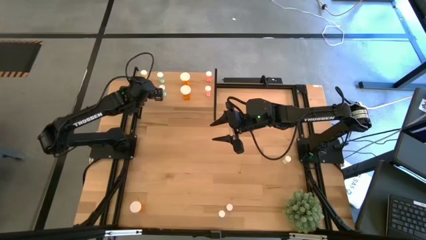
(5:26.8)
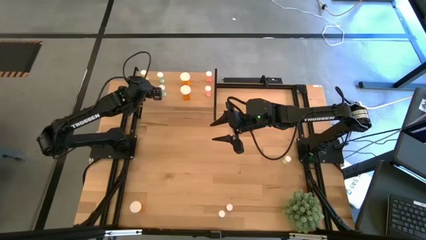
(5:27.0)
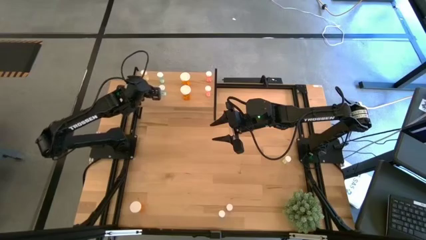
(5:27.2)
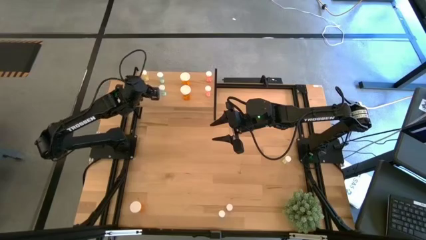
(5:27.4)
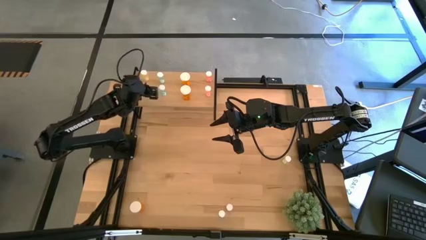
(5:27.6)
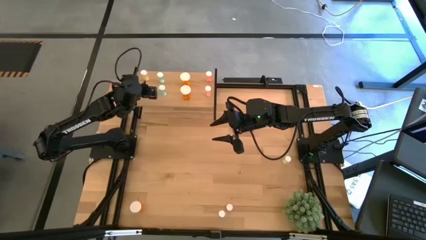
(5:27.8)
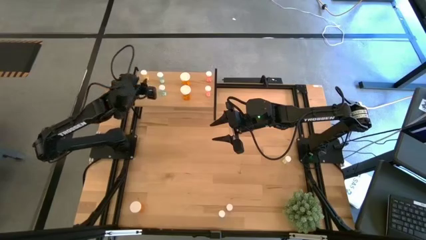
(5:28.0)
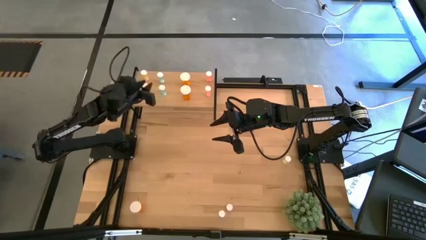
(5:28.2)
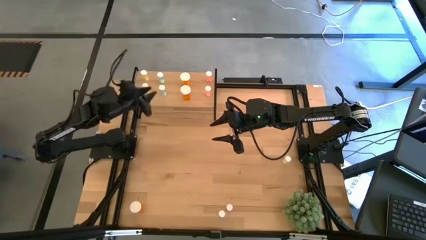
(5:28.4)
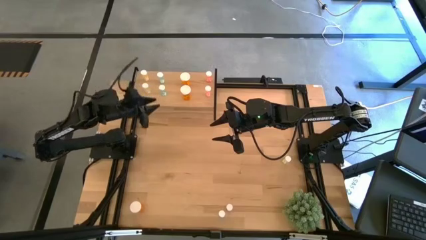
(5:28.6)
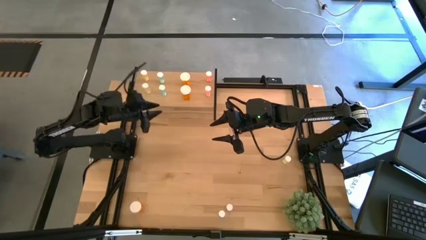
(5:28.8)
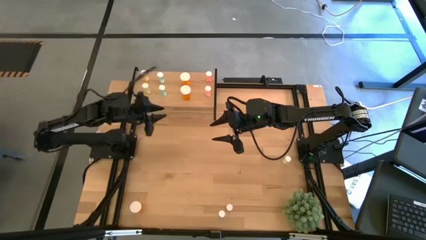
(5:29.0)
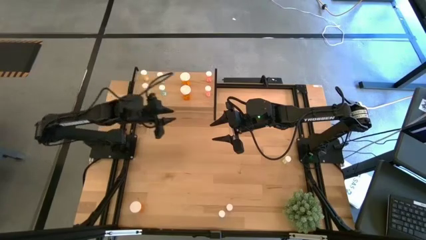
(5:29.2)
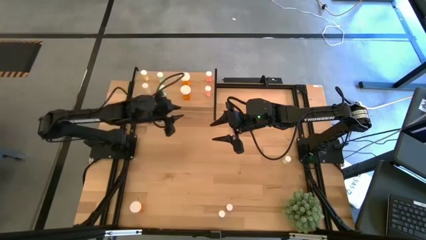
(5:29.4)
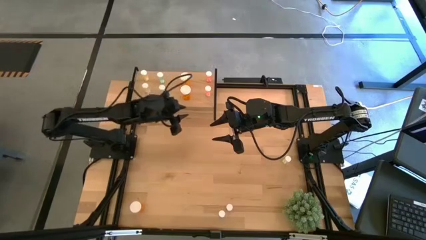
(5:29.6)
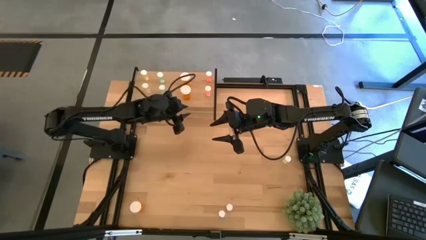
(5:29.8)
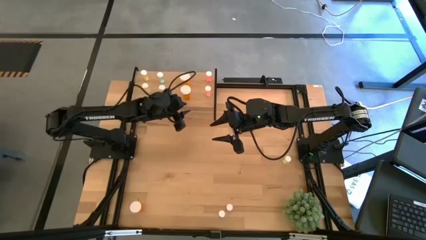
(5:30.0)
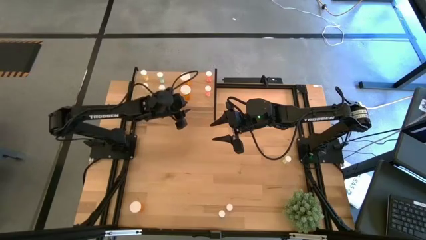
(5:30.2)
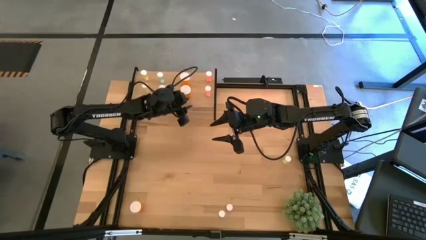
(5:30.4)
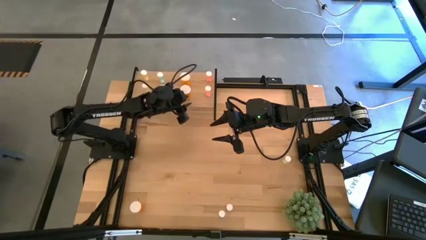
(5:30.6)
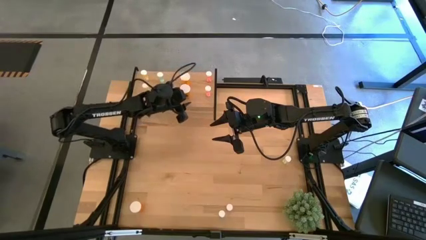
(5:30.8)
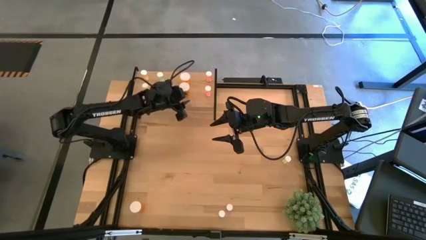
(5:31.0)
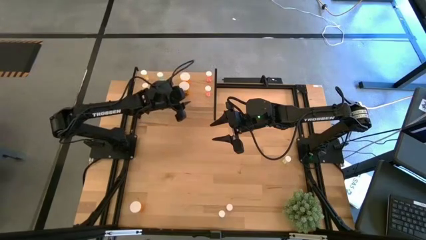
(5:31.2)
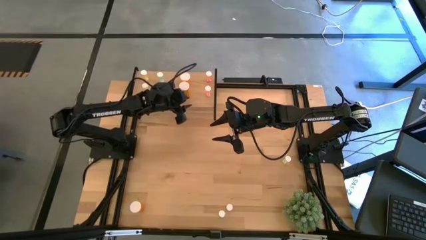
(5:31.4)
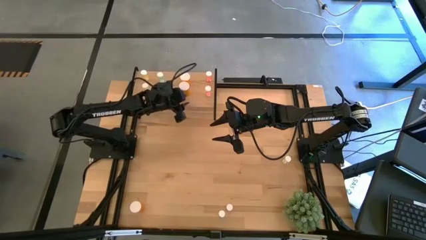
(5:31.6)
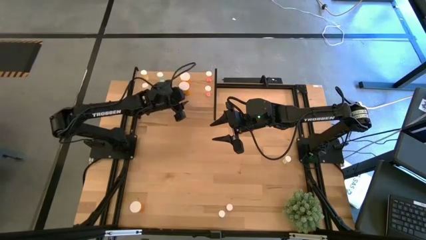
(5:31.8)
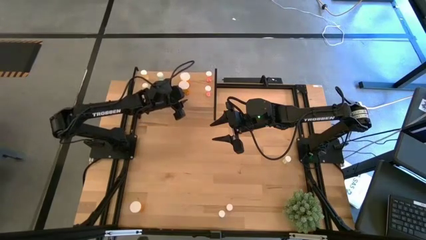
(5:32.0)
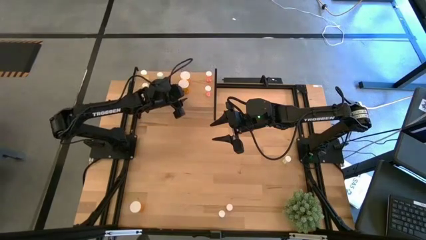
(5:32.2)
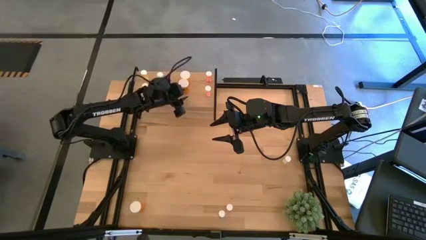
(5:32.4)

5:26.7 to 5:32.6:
Task: Pick and place medicine bottles onto shelf by color
Adjust the yellow pill

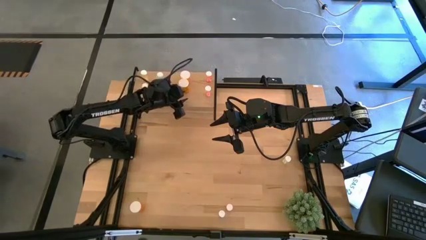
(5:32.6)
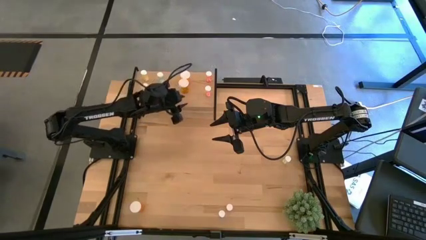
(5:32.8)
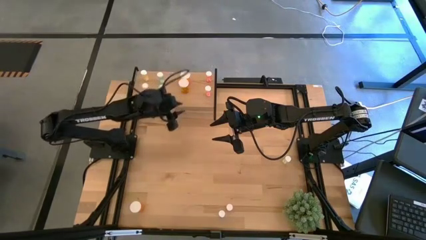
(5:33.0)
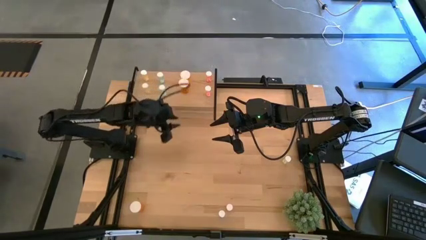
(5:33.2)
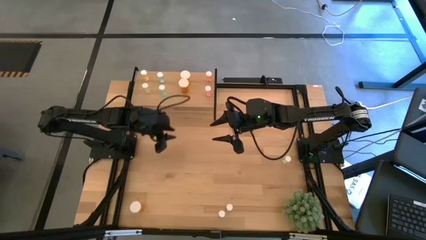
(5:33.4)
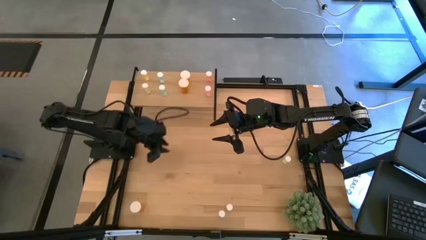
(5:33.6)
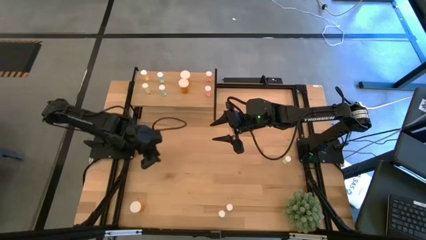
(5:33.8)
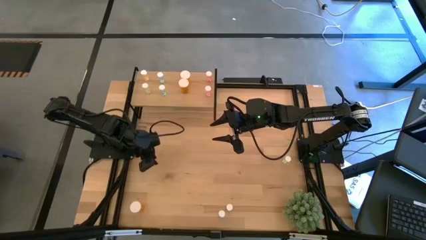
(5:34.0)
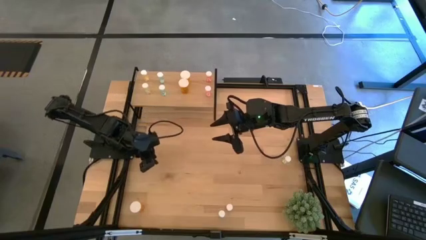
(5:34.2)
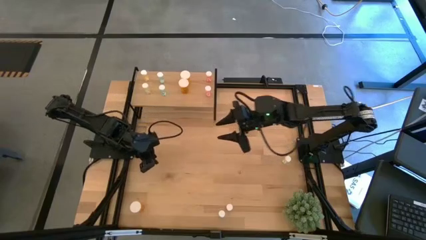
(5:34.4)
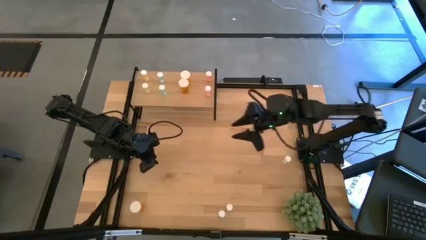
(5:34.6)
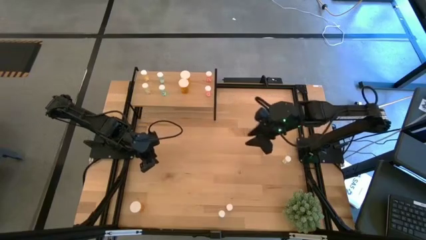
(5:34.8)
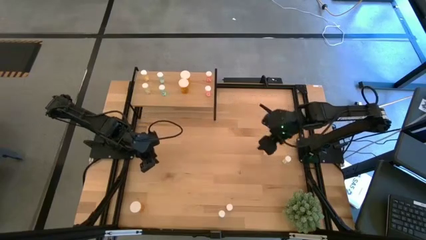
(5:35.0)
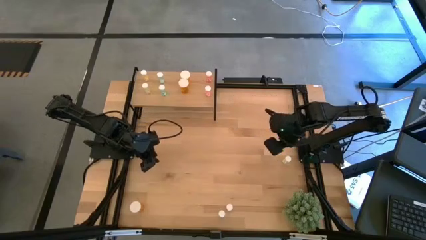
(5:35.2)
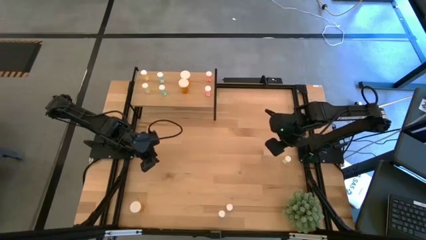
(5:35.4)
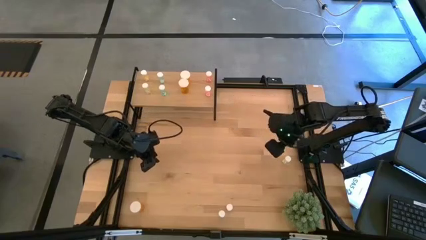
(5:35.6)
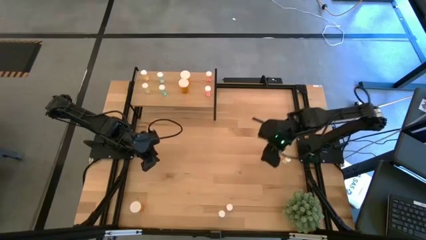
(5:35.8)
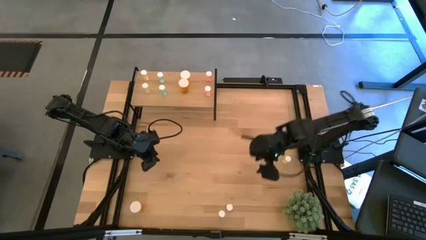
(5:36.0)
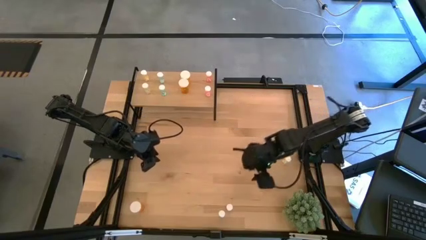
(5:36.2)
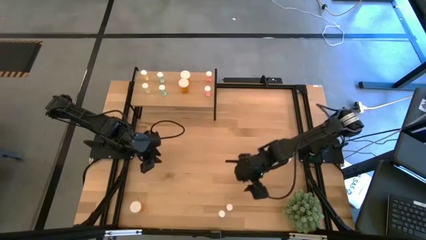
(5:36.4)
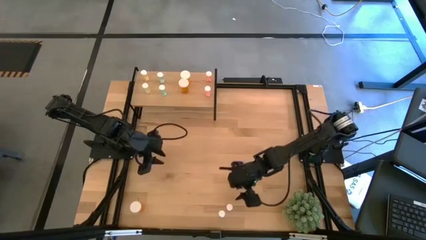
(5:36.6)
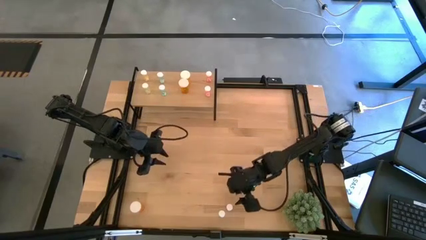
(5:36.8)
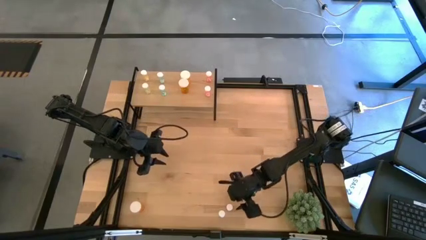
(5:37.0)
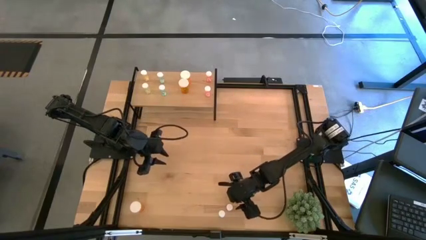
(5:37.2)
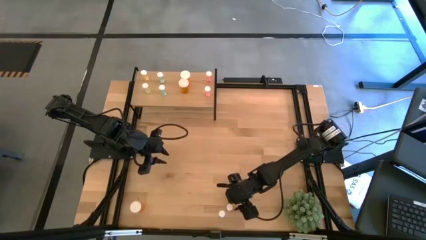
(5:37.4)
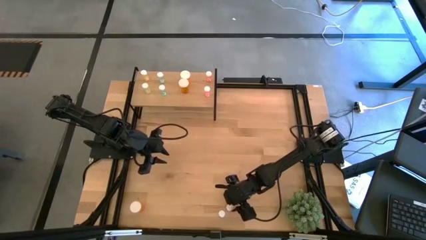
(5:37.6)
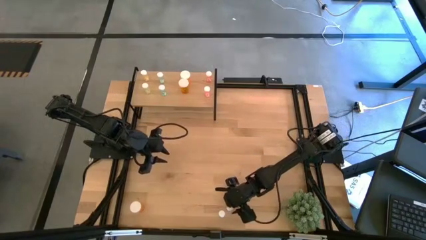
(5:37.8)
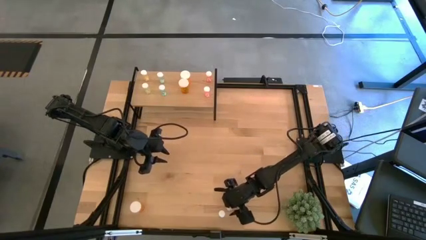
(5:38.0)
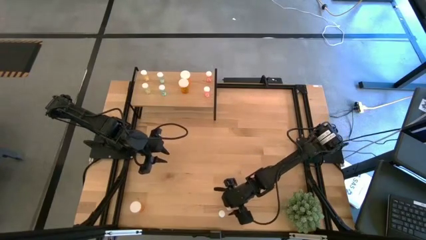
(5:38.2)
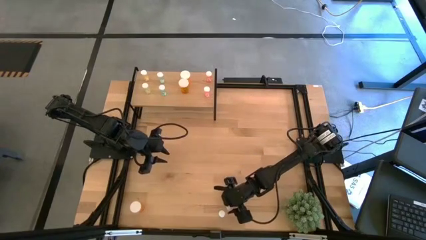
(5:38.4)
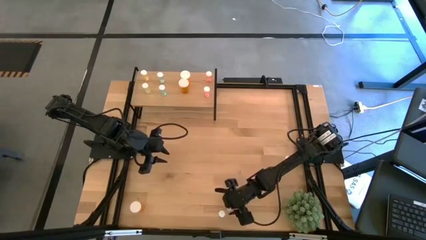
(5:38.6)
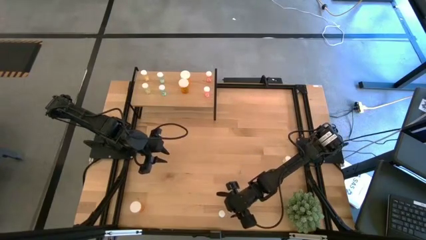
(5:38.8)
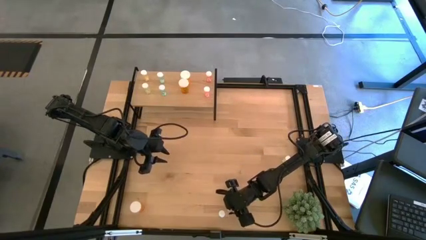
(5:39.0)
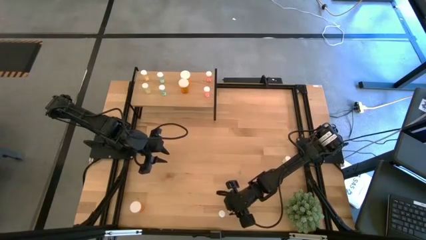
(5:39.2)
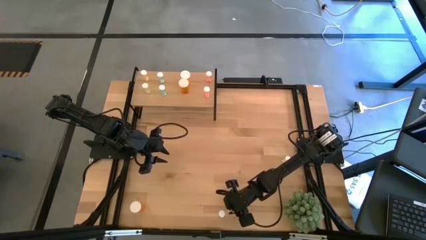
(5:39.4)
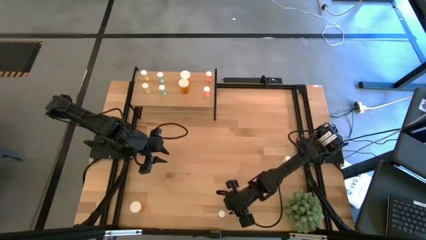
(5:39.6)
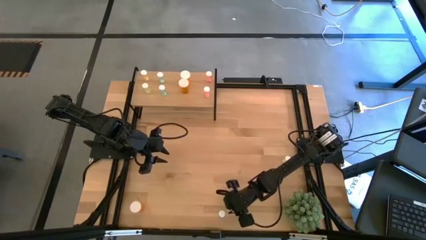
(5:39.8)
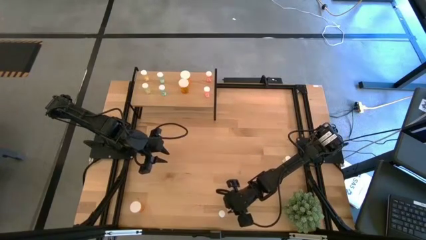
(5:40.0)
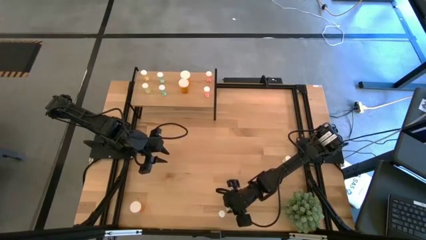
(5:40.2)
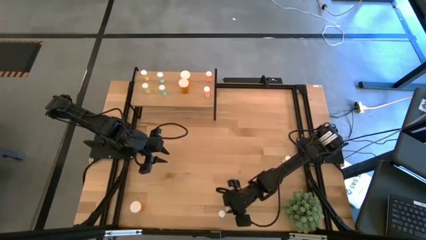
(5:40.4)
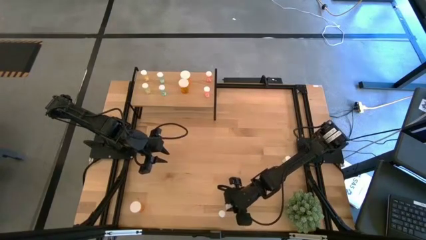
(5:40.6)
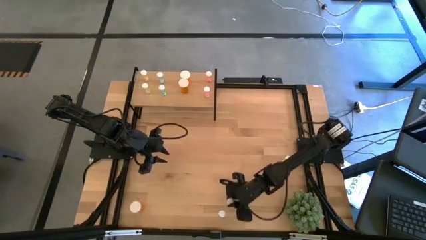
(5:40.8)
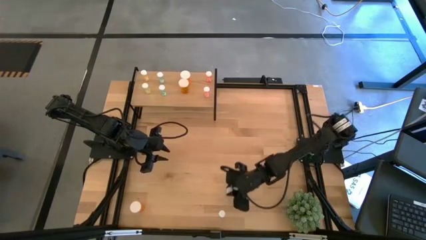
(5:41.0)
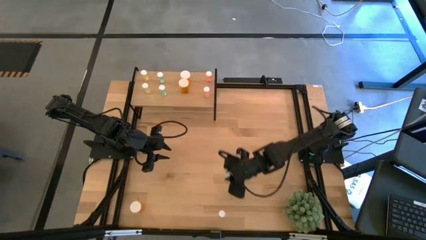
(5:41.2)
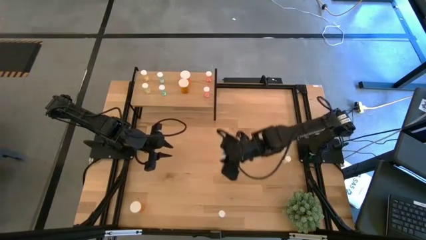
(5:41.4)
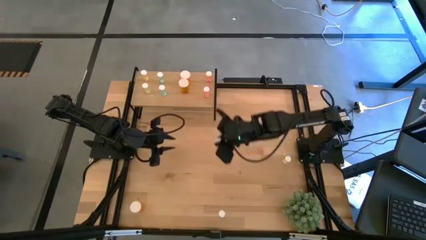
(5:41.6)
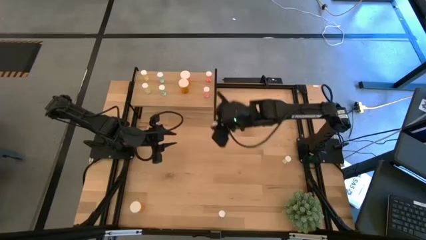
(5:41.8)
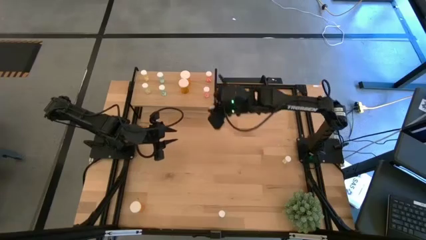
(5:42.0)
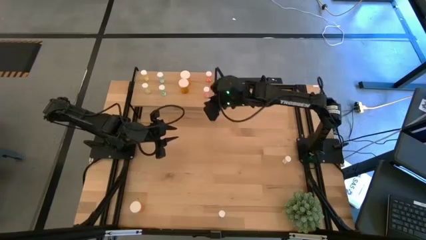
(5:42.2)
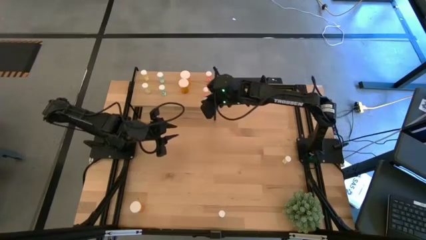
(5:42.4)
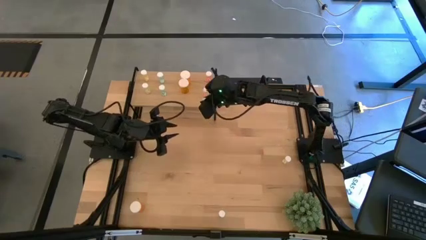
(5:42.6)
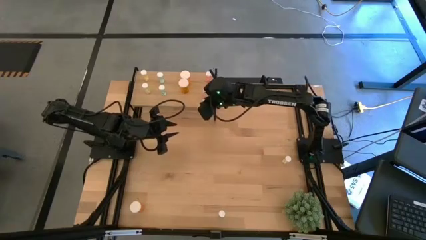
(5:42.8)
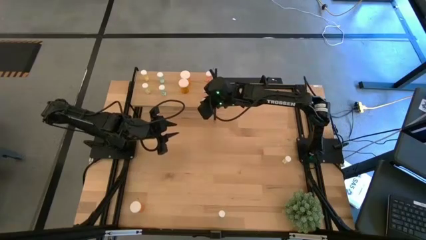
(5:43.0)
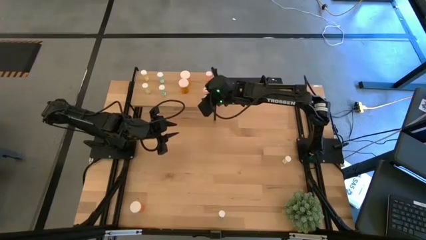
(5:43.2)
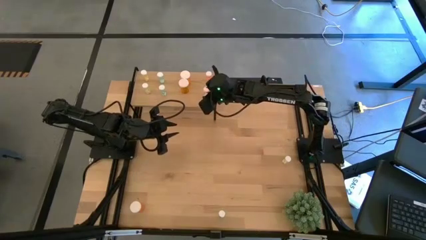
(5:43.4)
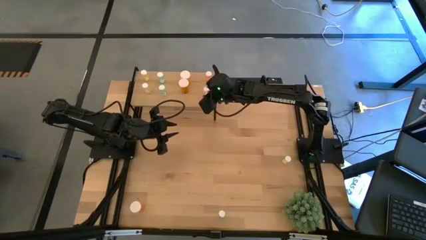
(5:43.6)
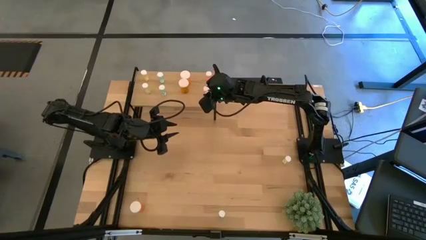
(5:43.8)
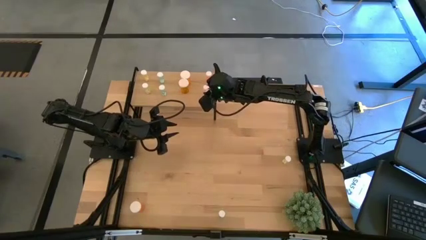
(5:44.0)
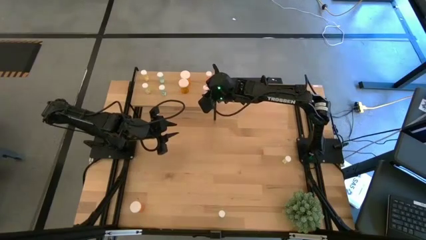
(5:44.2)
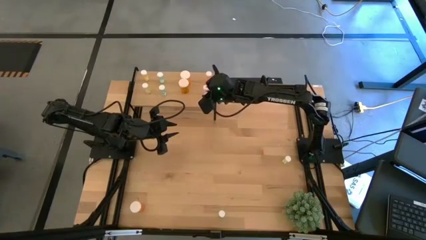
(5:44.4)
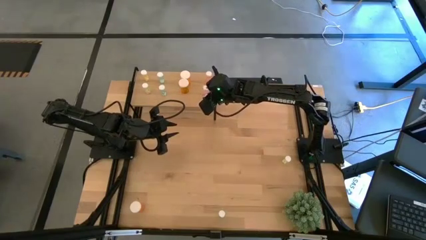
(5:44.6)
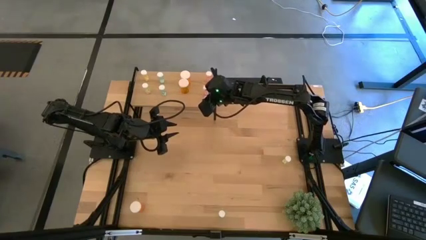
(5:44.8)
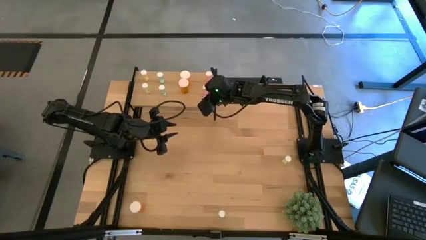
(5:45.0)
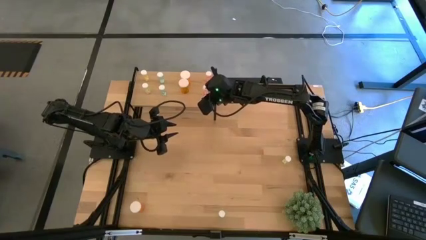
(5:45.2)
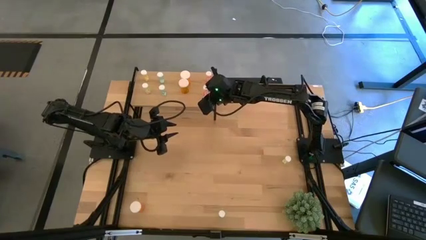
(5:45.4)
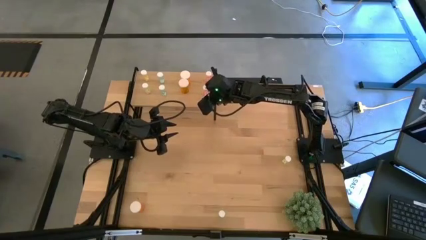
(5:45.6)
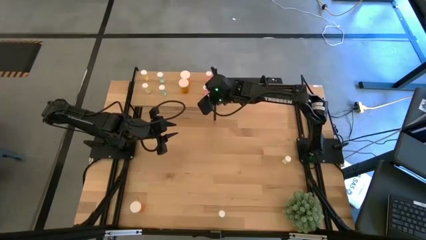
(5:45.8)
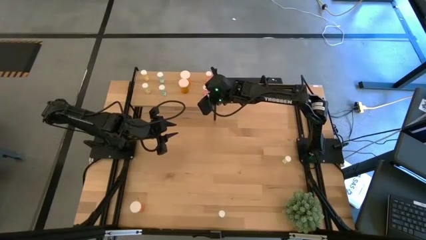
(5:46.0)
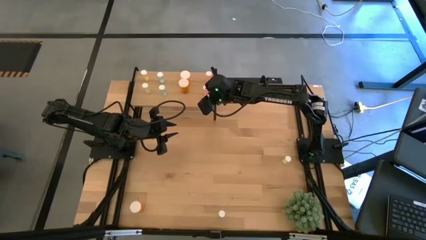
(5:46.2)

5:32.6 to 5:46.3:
Put the small red pill on the shelf aligned with the red on the shelf
